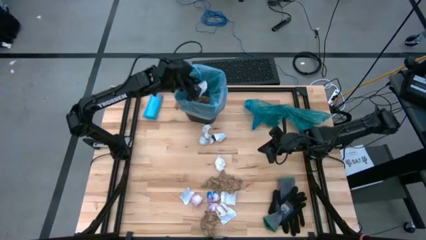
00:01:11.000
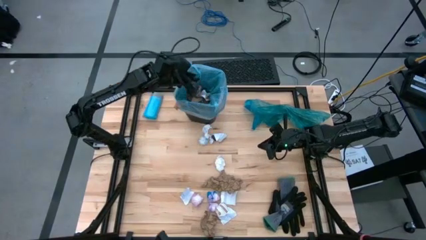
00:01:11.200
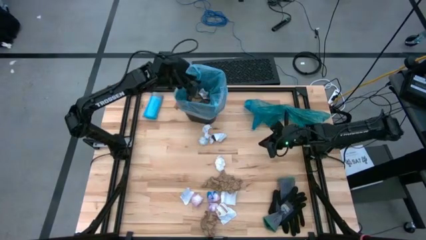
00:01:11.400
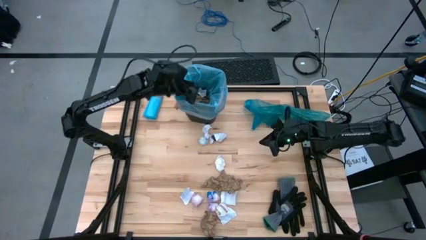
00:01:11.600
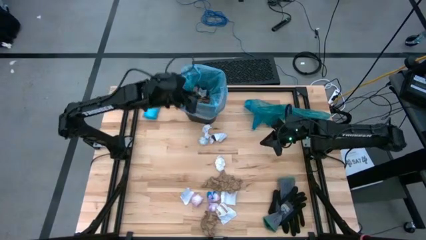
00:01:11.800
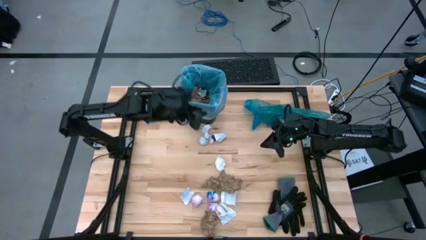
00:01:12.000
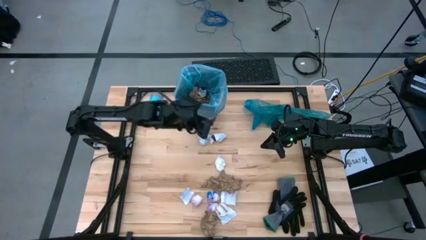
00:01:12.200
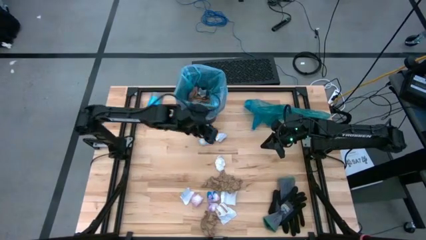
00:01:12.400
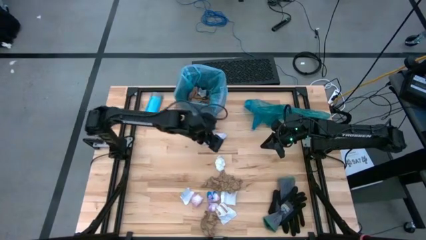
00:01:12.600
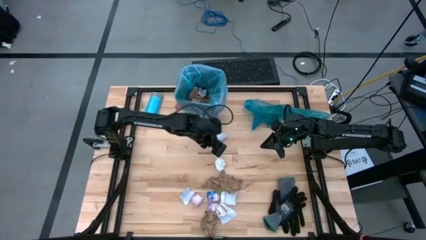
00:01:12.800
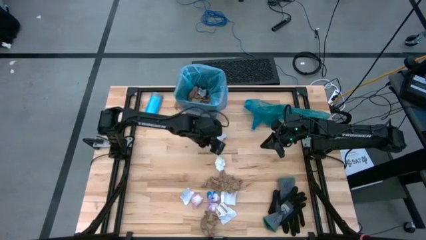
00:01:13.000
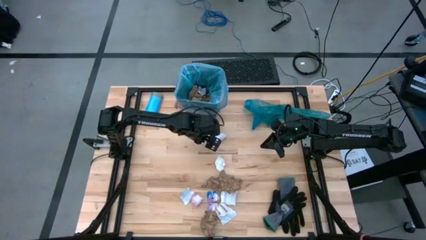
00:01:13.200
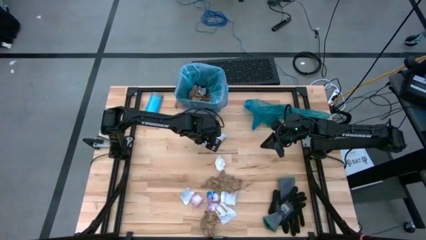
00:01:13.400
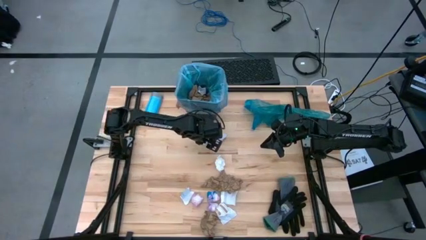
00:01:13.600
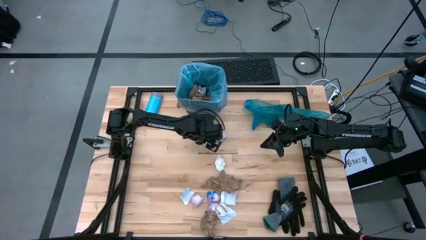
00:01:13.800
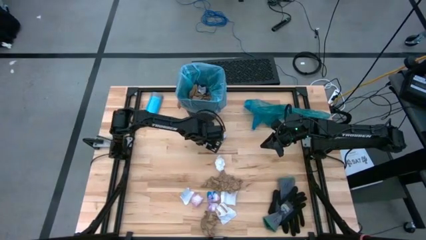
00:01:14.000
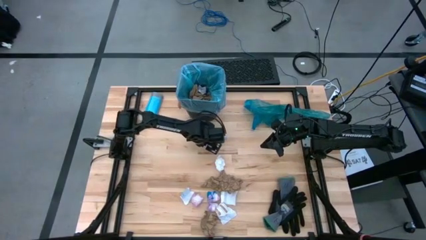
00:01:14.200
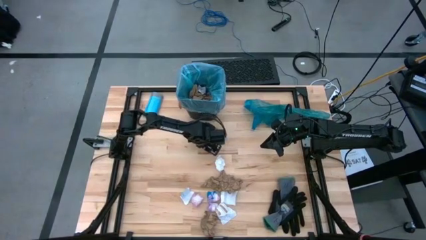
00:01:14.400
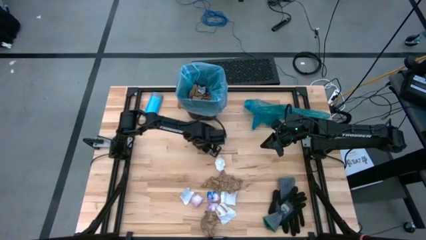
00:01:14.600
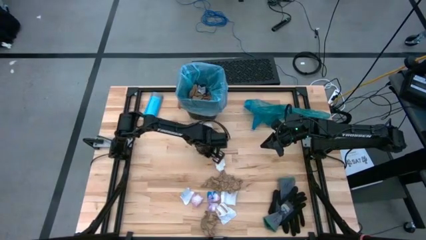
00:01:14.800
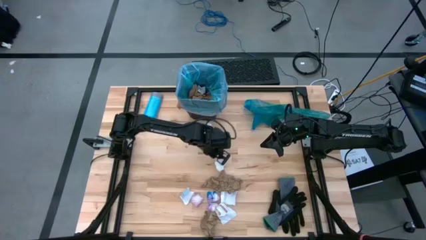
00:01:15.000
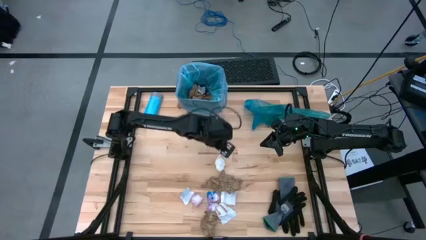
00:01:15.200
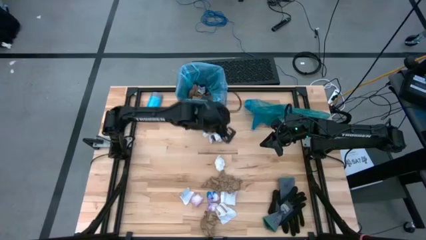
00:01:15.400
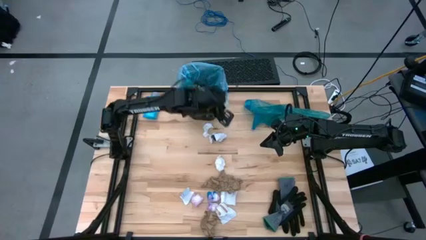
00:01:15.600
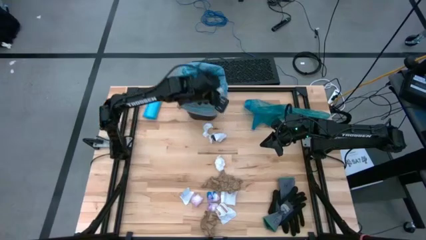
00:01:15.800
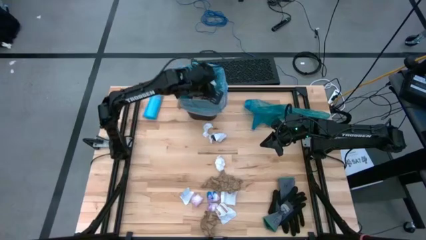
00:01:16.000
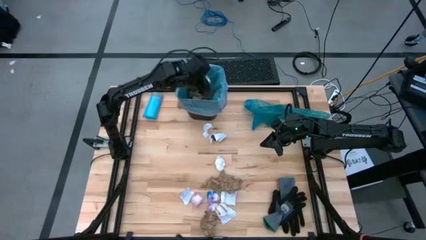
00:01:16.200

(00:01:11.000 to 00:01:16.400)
Task: place trash/remove bag and relplace
Put the blue plastic trash into the trash bin

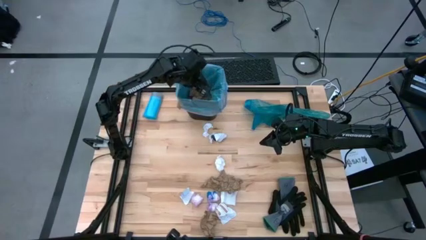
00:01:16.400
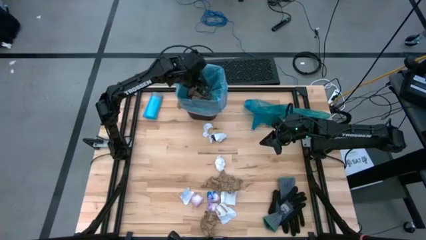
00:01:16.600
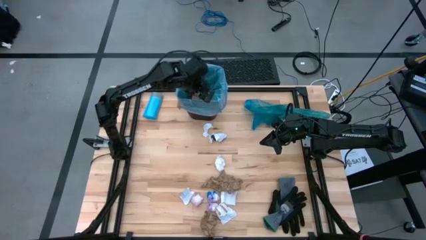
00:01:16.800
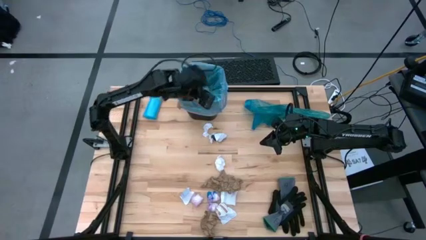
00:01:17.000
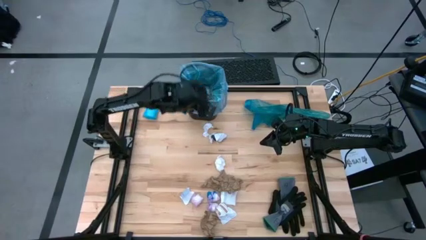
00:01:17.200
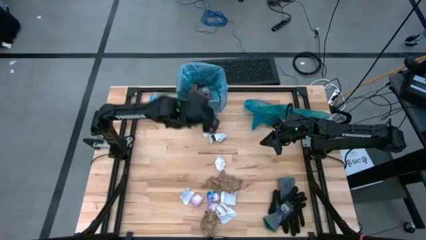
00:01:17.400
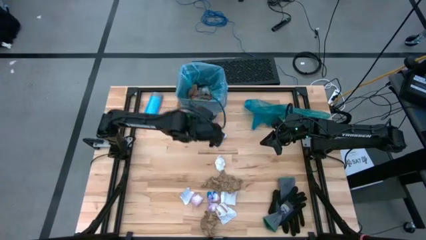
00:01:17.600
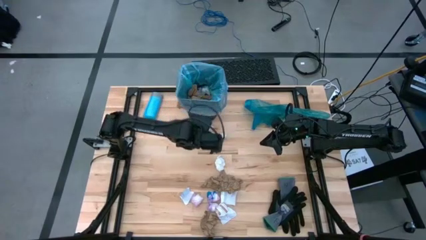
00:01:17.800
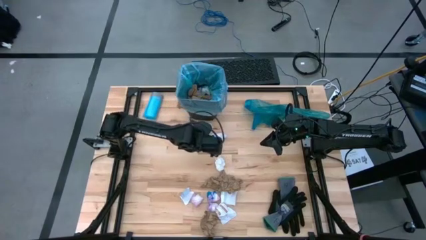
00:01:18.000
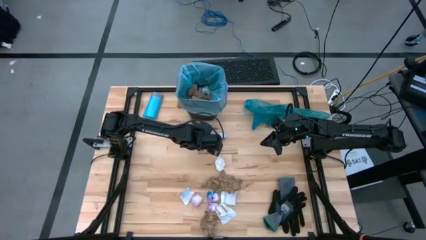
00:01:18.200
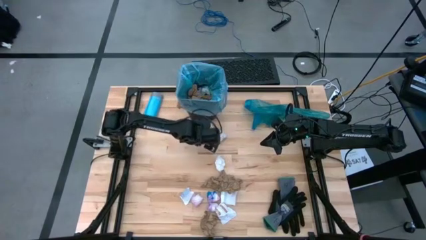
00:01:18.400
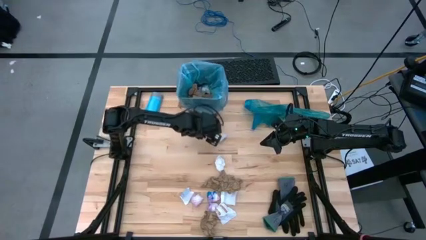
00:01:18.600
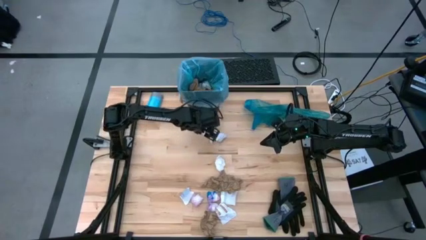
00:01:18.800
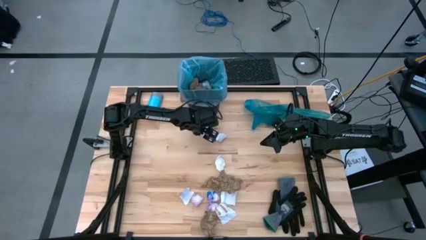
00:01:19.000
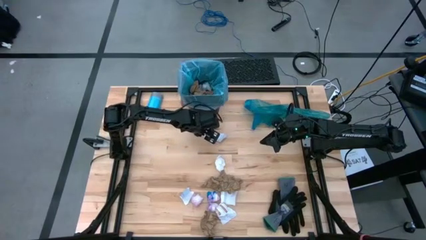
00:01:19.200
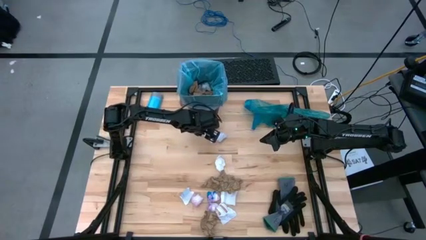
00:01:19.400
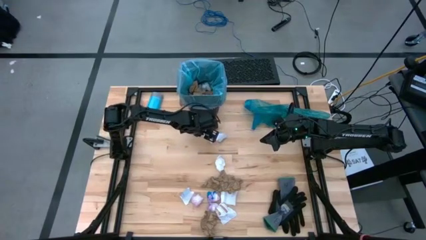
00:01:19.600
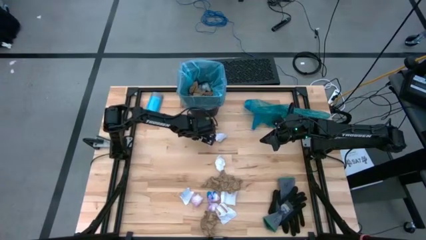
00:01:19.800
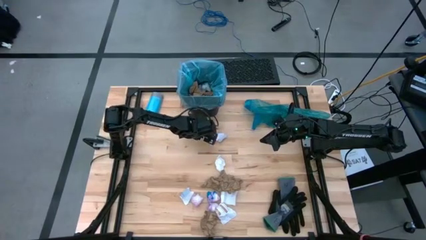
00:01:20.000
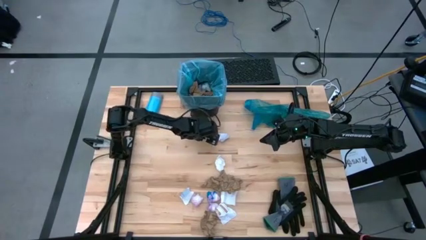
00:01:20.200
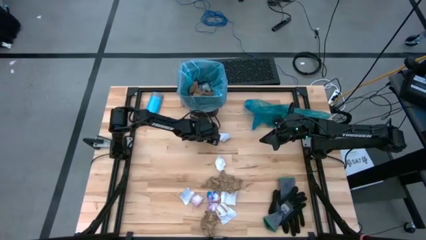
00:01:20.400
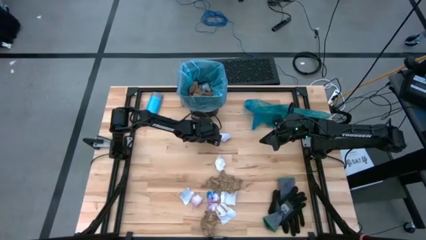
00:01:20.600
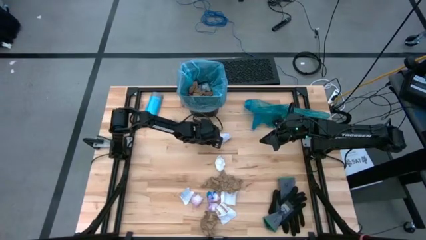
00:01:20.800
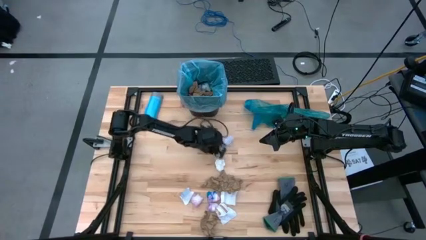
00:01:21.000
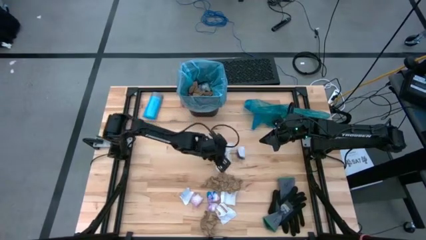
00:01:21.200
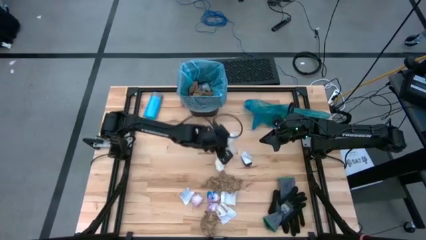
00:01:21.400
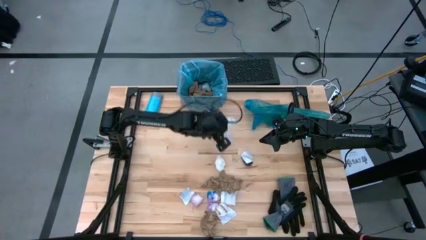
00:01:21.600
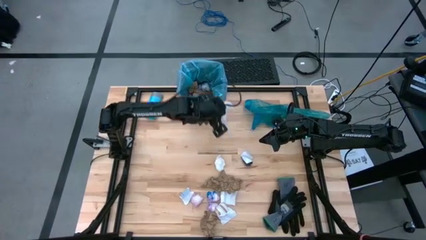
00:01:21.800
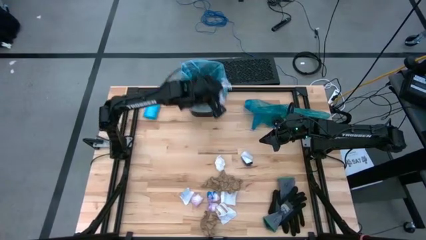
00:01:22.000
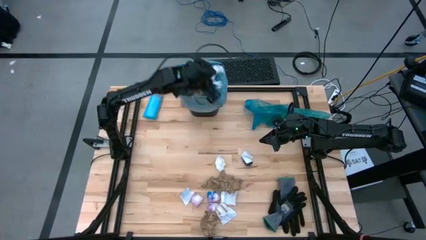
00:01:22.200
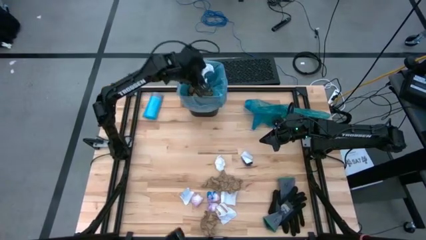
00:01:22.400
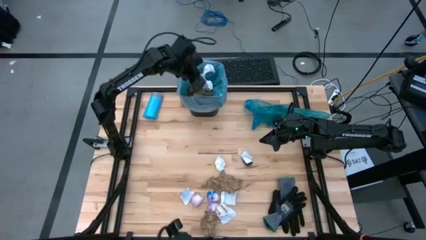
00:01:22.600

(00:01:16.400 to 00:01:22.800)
Put the white paper trash into the trash bin

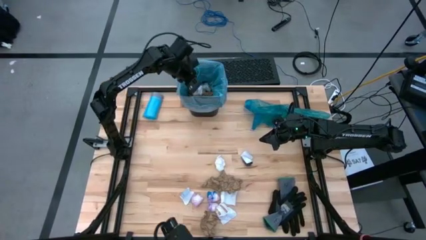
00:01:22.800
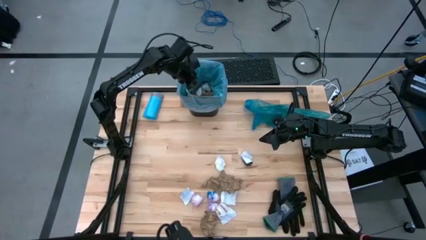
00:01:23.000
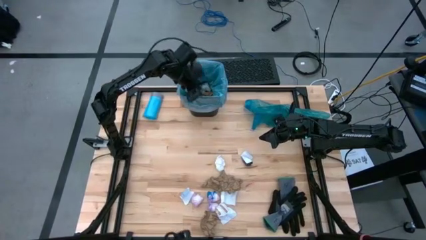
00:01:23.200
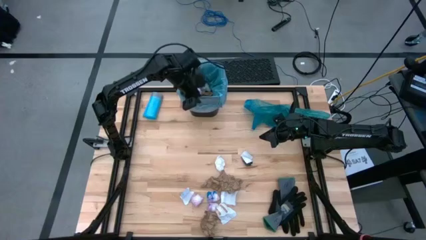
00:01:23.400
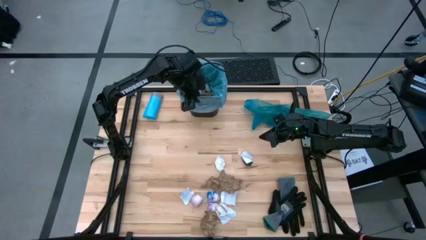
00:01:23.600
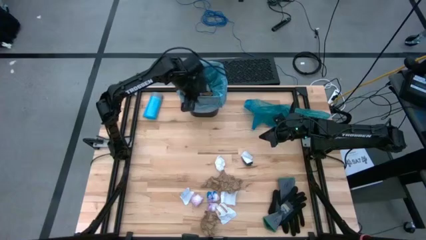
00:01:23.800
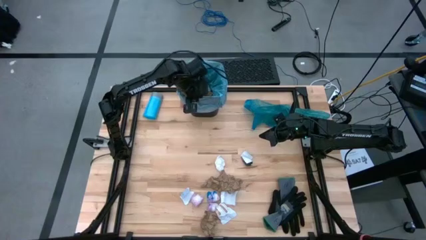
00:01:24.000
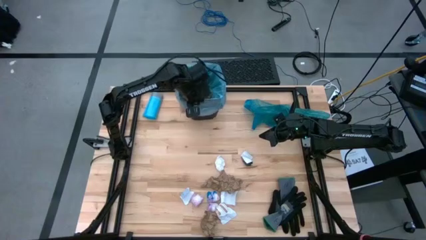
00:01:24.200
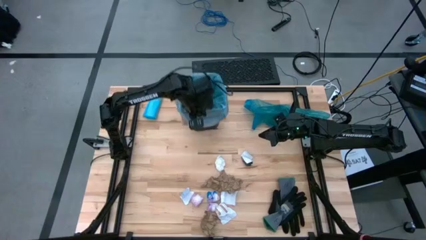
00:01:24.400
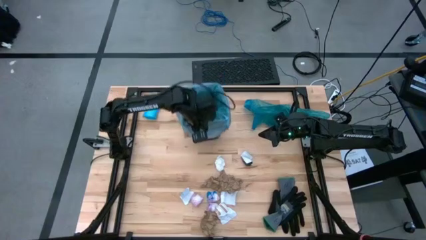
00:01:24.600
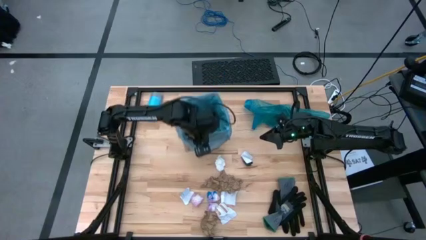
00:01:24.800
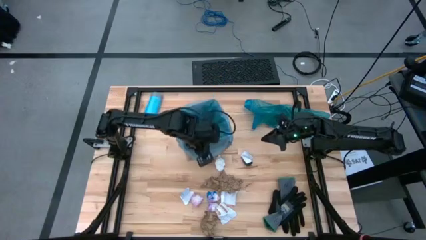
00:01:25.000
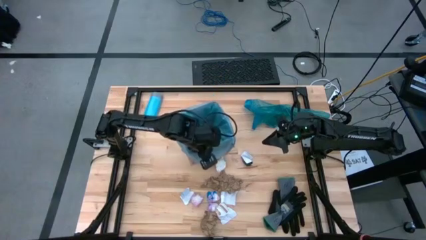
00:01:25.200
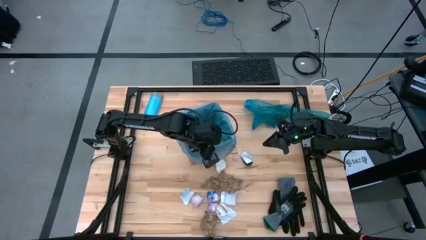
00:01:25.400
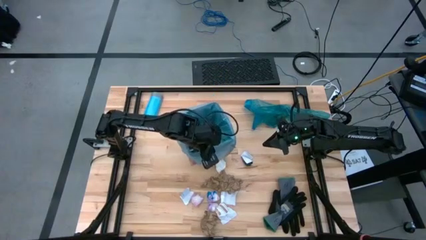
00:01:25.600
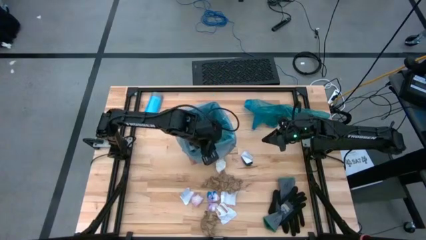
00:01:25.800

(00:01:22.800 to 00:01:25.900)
Move the trash bin to the center
